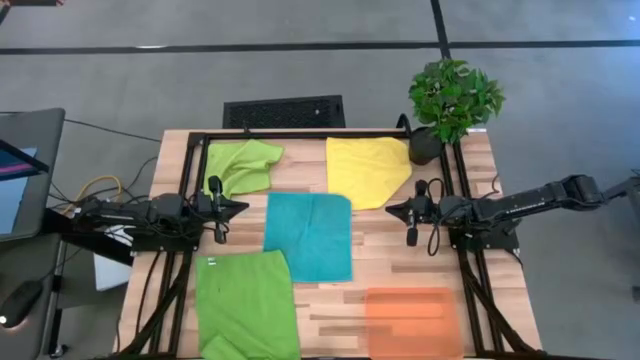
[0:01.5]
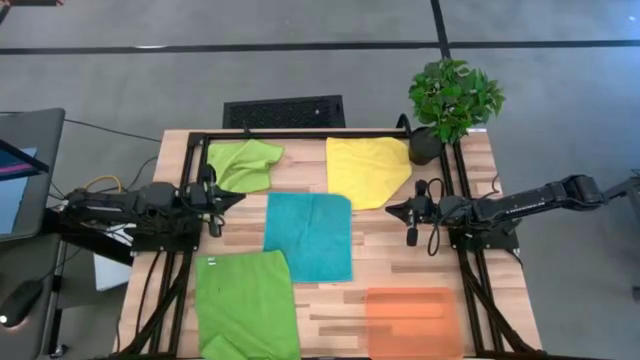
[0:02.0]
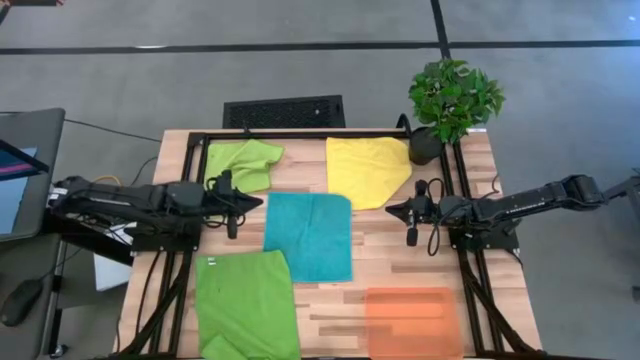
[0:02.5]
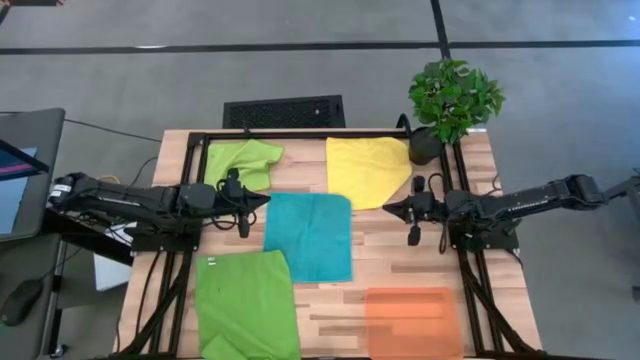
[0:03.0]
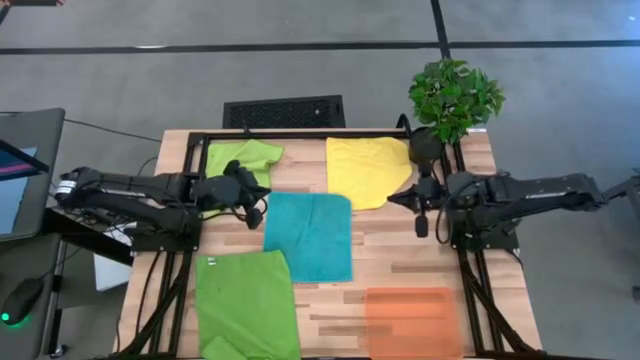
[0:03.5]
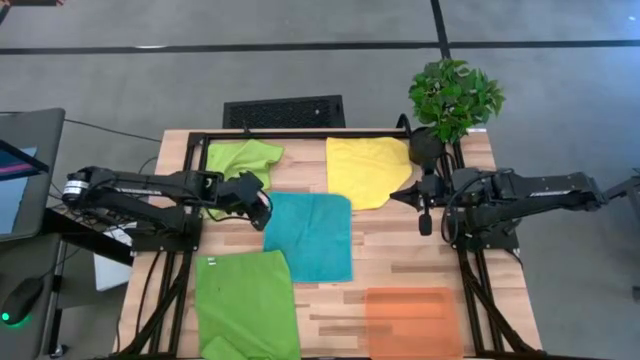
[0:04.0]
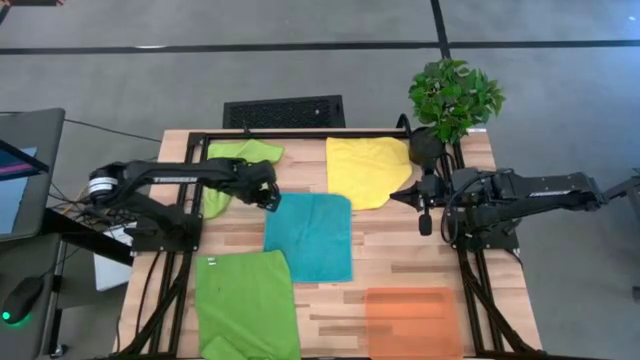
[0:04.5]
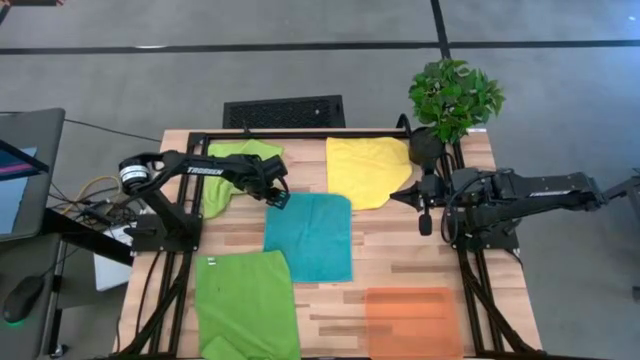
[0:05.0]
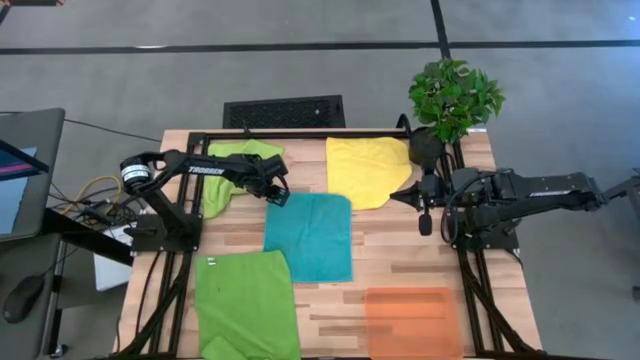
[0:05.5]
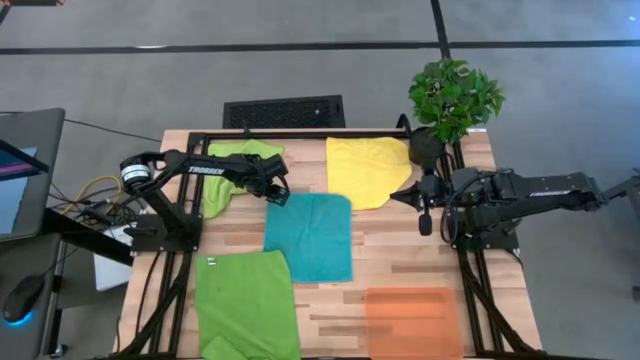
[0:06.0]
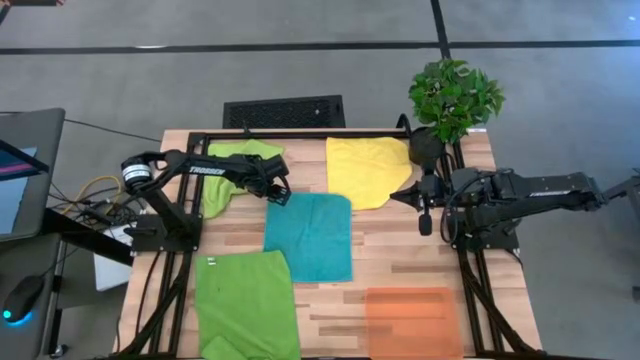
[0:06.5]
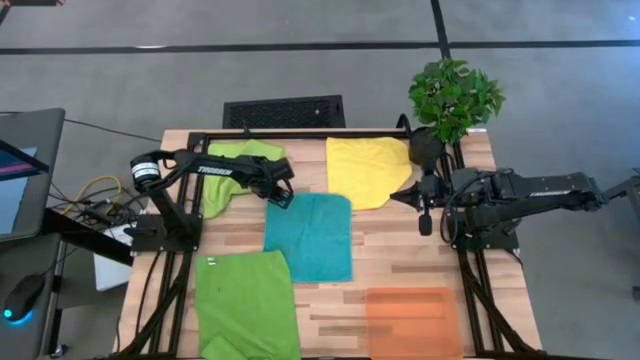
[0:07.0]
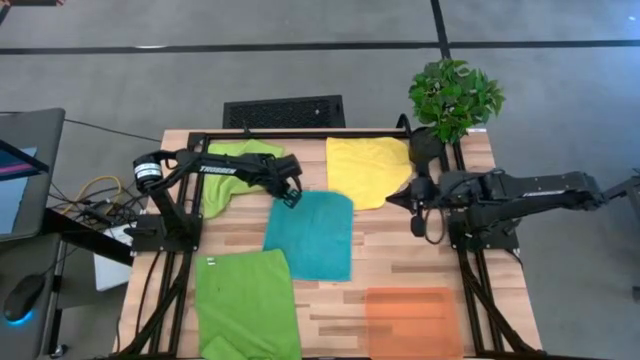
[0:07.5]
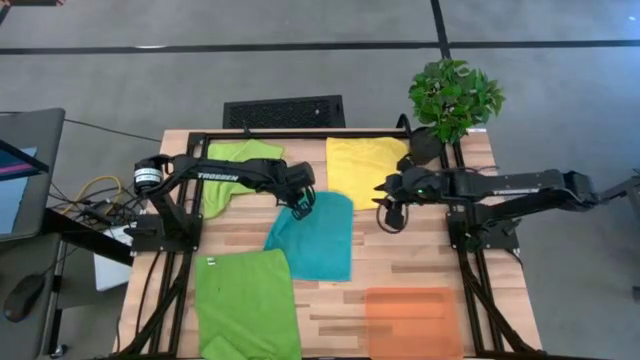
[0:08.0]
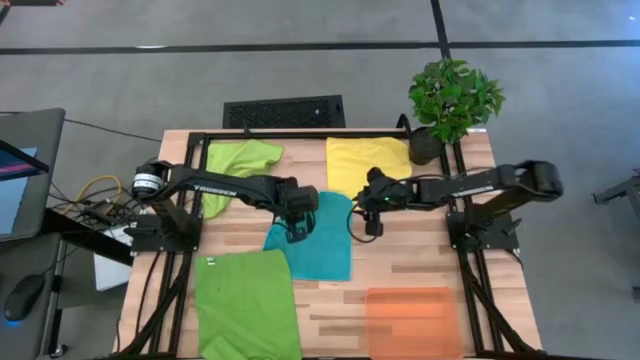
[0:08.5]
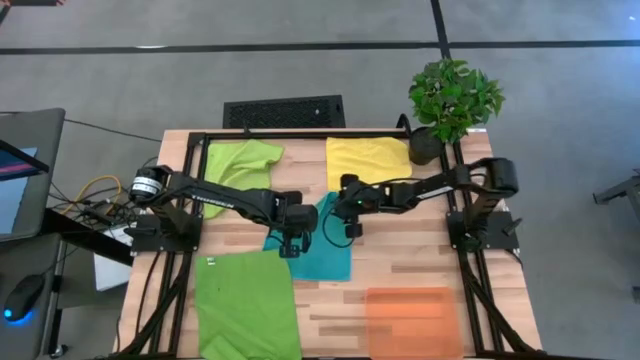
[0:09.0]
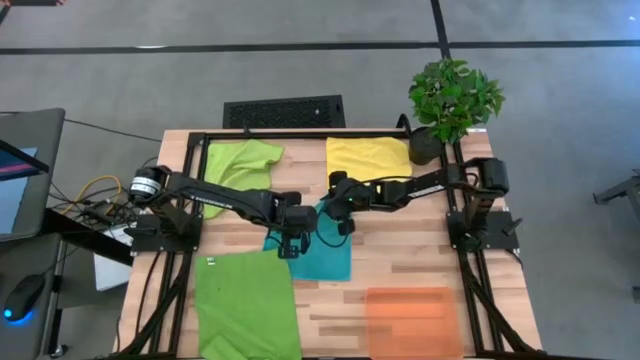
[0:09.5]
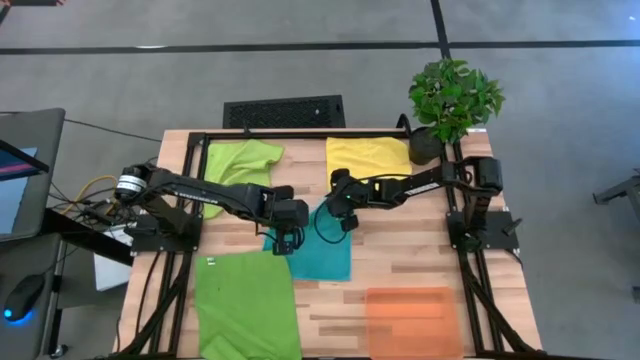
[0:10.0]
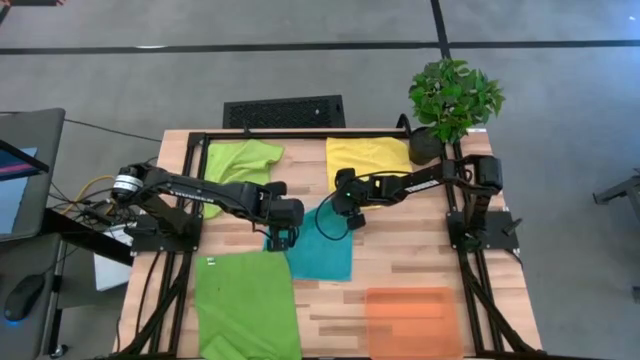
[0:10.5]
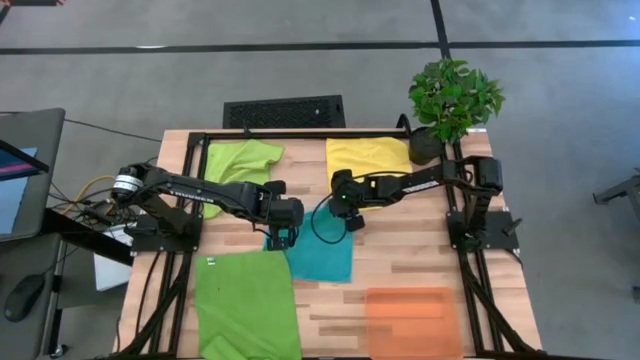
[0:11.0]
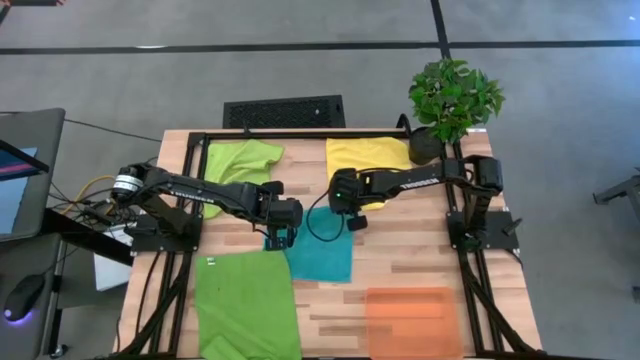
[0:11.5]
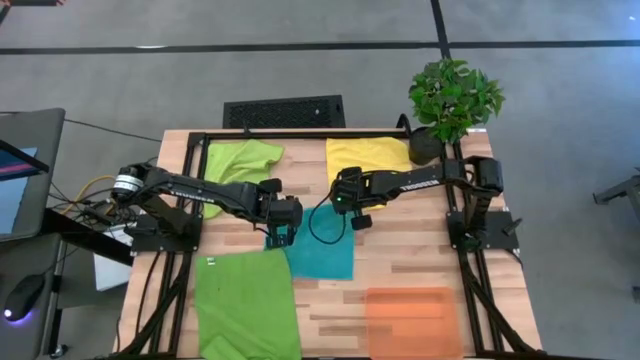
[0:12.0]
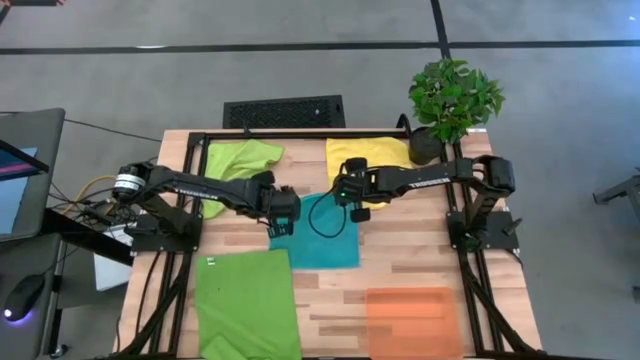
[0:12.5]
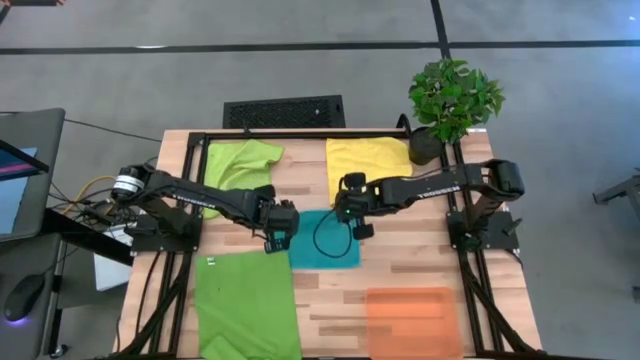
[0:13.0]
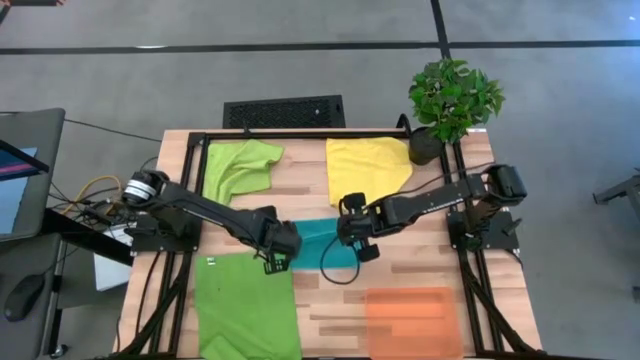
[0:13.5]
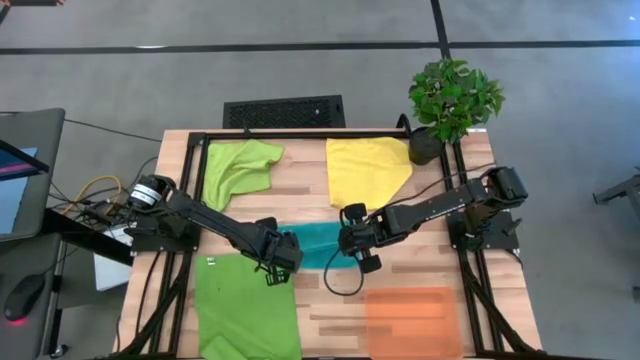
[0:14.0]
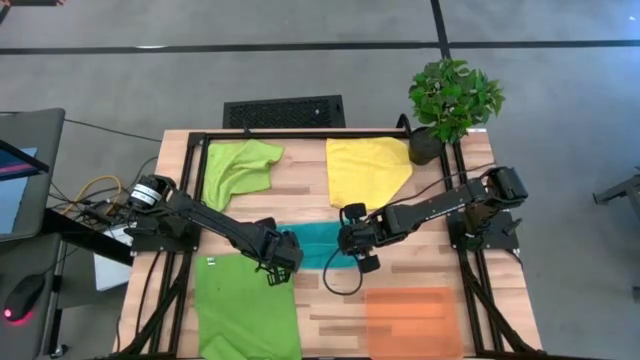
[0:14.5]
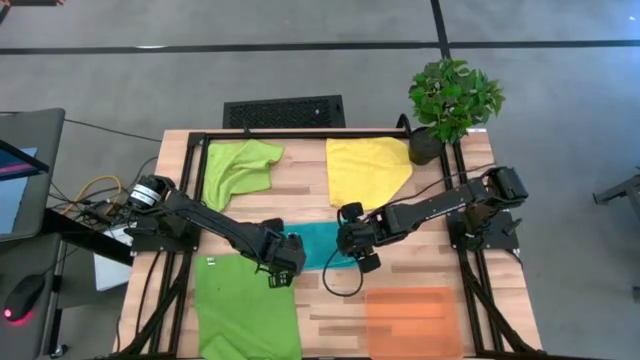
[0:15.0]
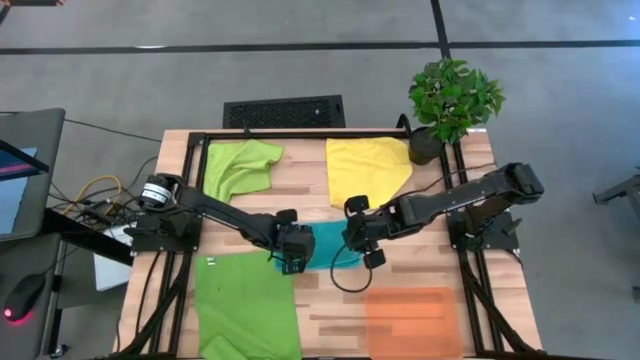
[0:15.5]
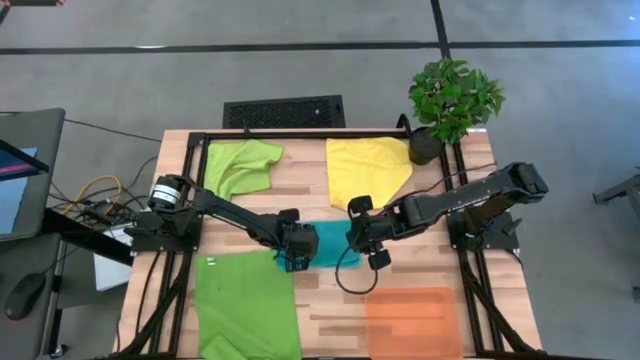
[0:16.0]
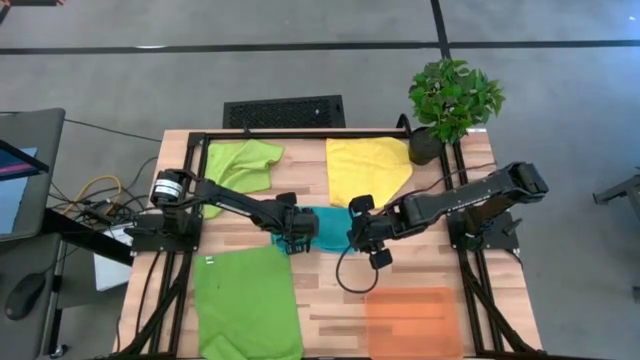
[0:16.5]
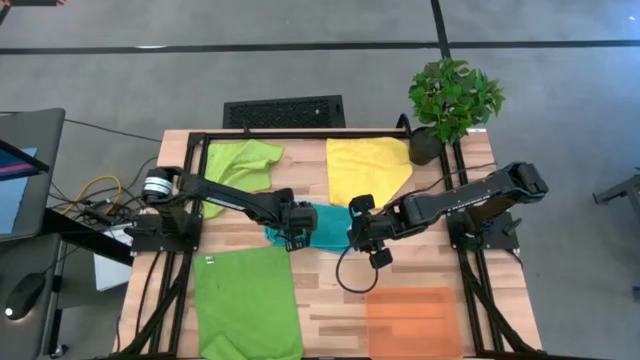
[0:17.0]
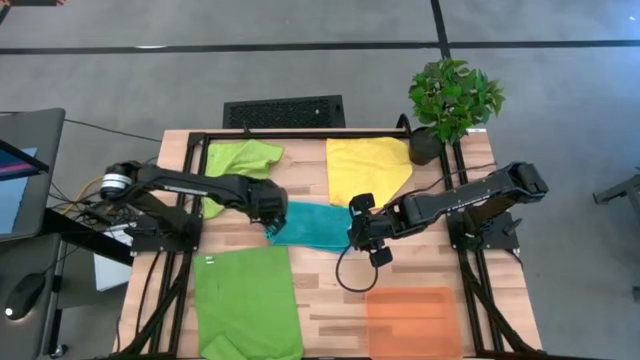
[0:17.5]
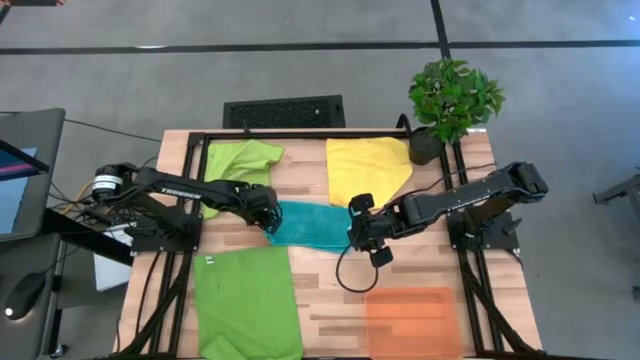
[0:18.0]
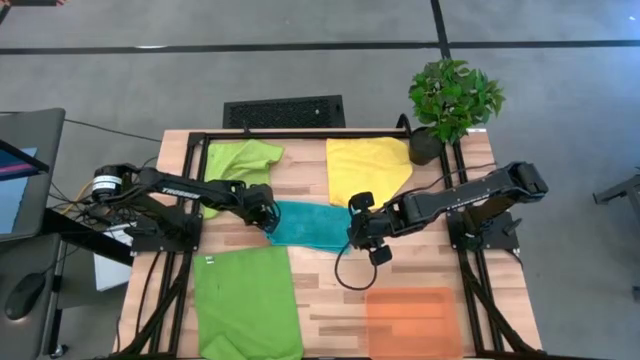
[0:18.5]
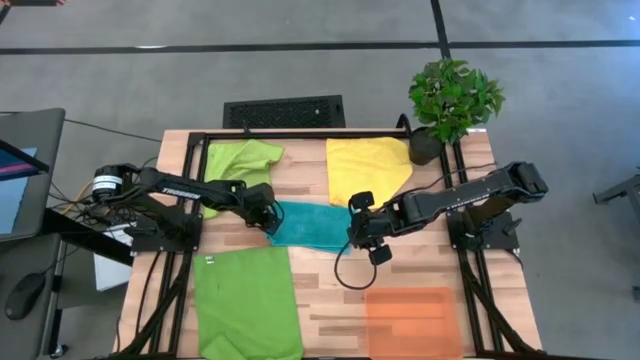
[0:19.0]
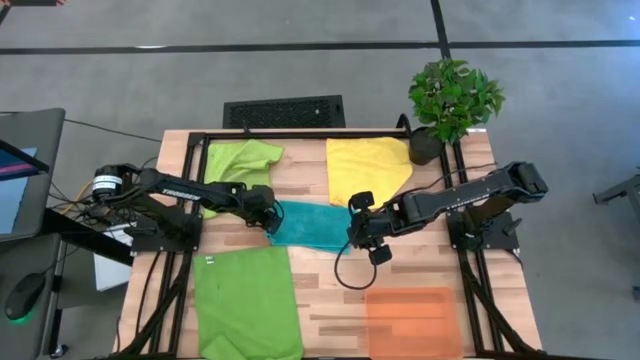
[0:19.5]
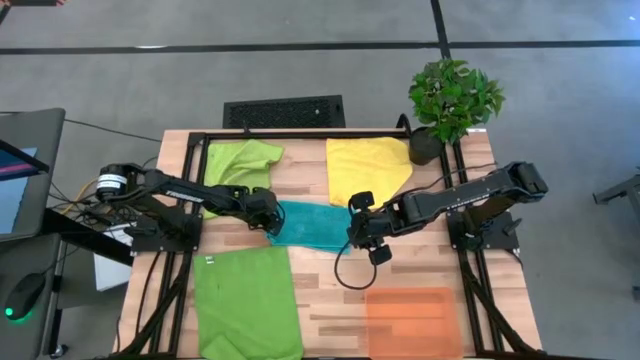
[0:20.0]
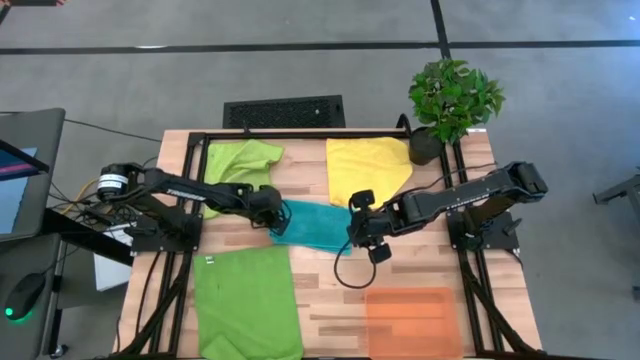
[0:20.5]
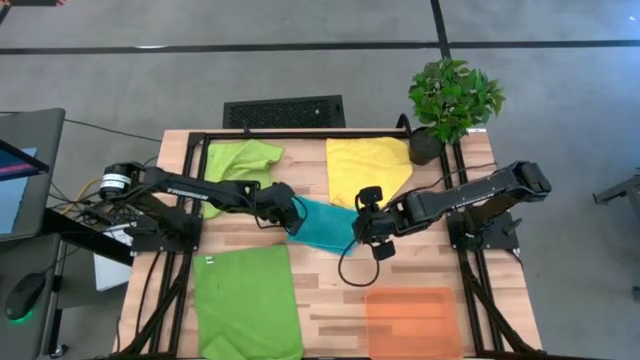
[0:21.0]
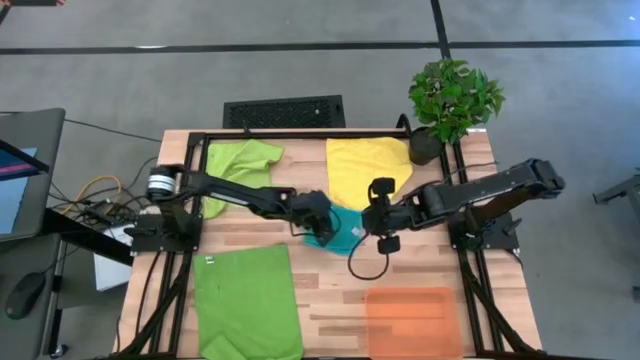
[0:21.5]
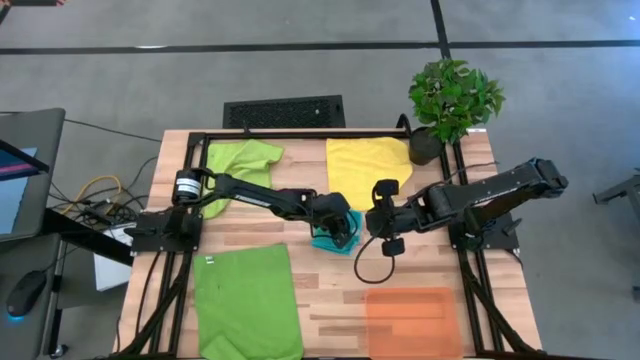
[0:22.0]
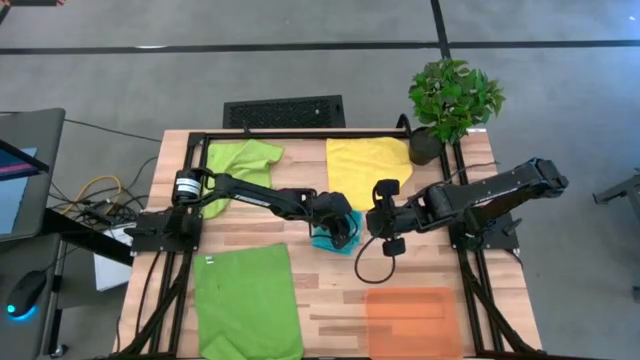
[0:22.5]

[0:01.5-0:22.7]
Task: Fold microfiber towels
Fold the blue microfiber towel
